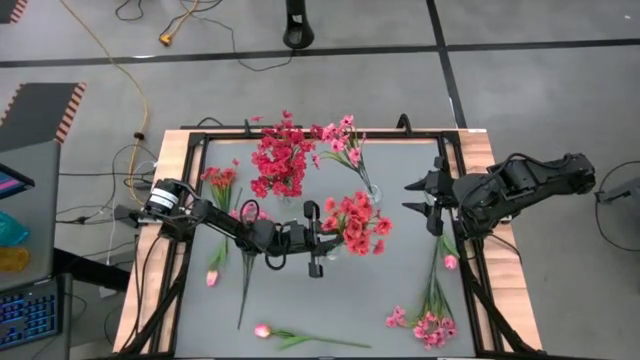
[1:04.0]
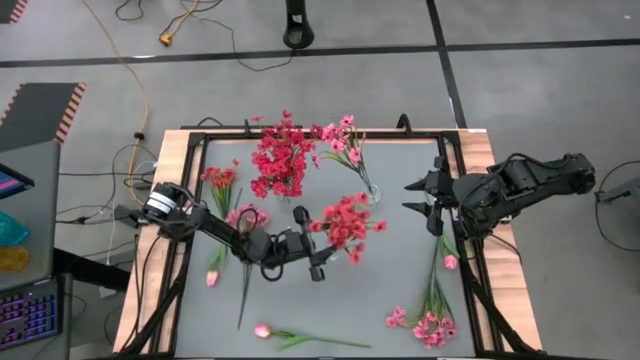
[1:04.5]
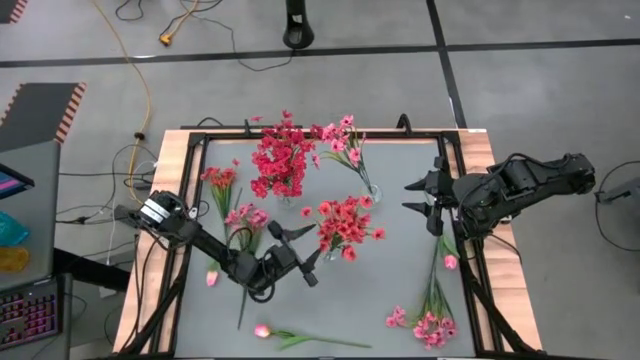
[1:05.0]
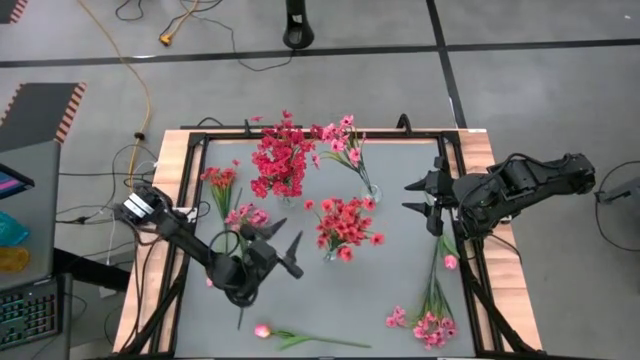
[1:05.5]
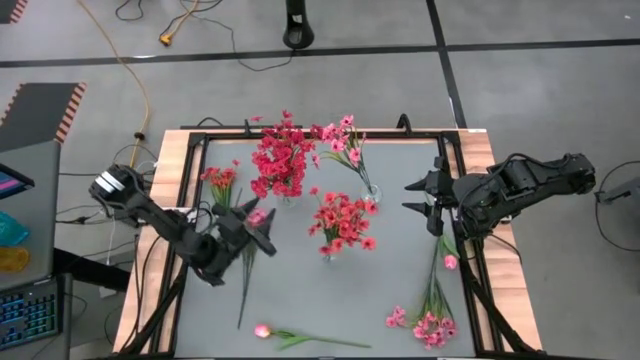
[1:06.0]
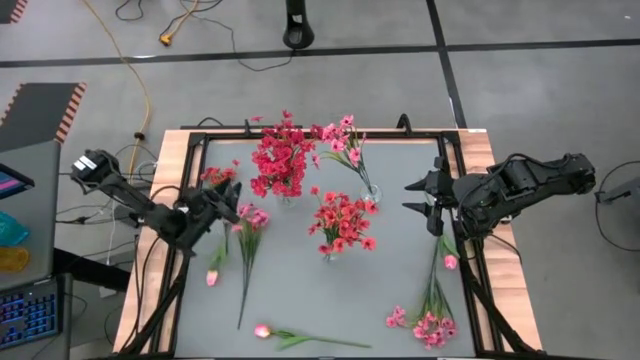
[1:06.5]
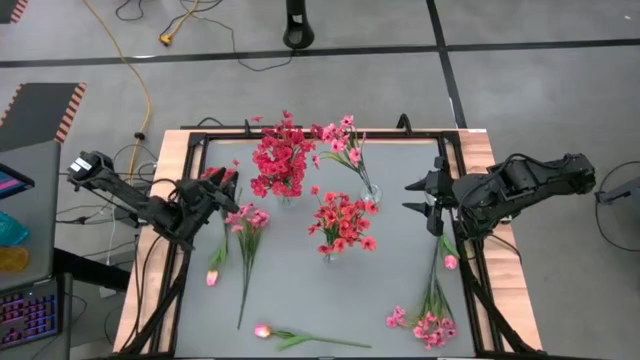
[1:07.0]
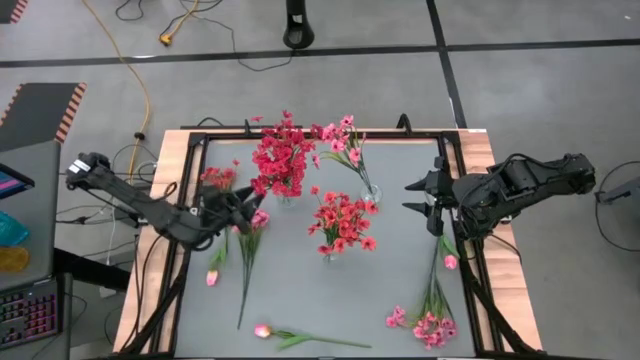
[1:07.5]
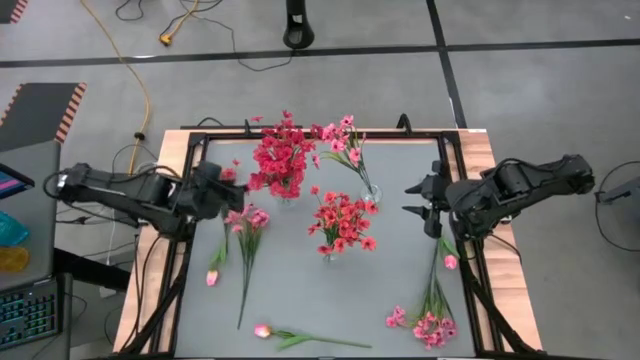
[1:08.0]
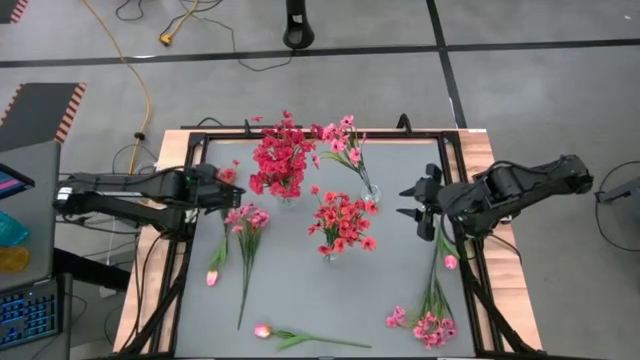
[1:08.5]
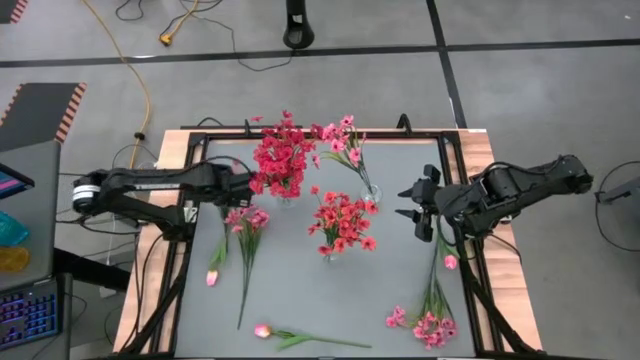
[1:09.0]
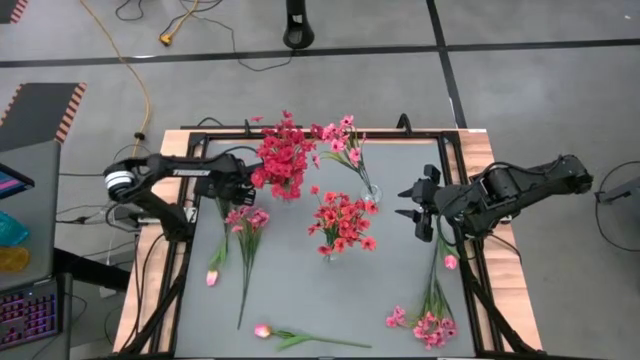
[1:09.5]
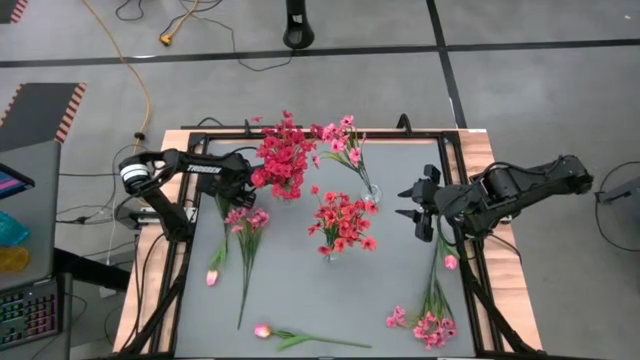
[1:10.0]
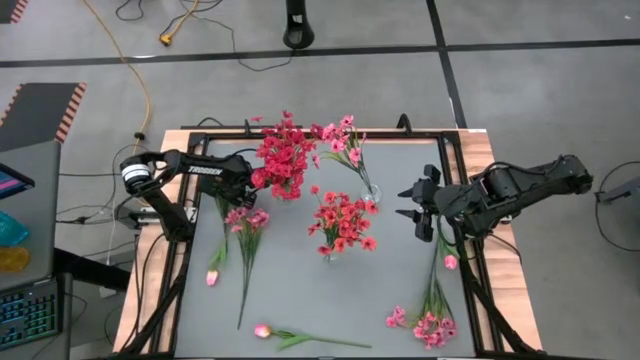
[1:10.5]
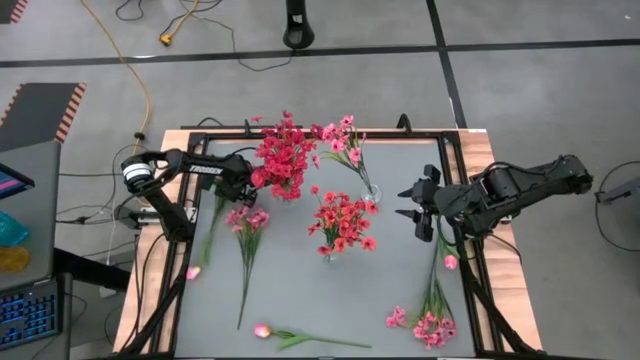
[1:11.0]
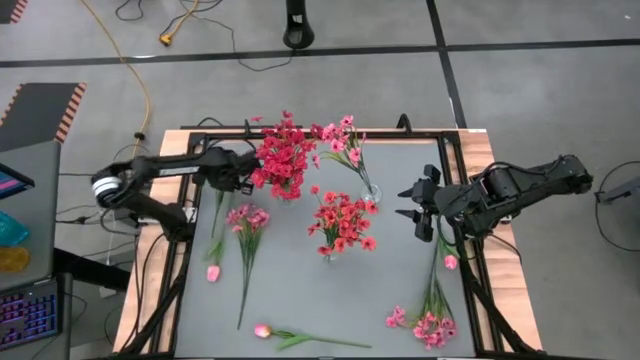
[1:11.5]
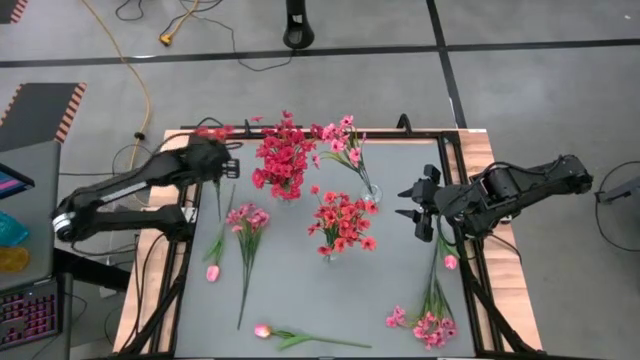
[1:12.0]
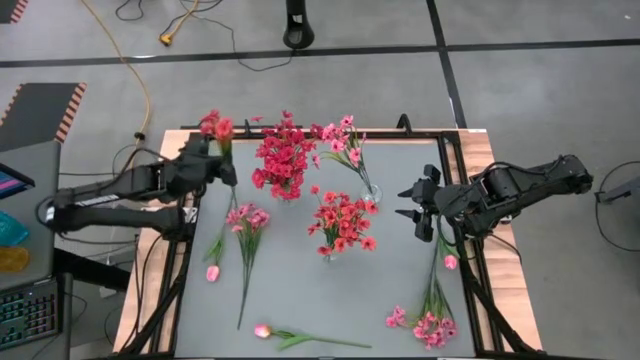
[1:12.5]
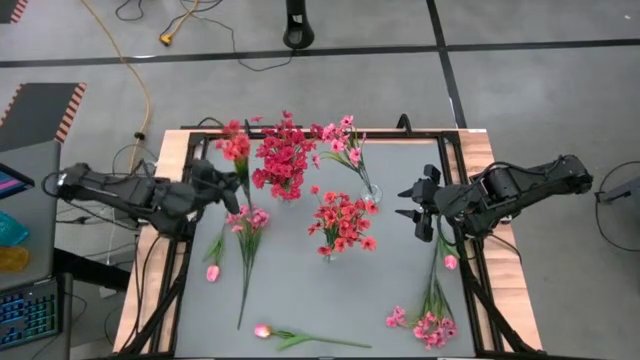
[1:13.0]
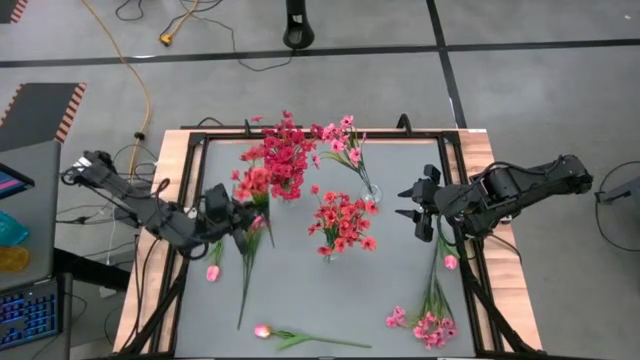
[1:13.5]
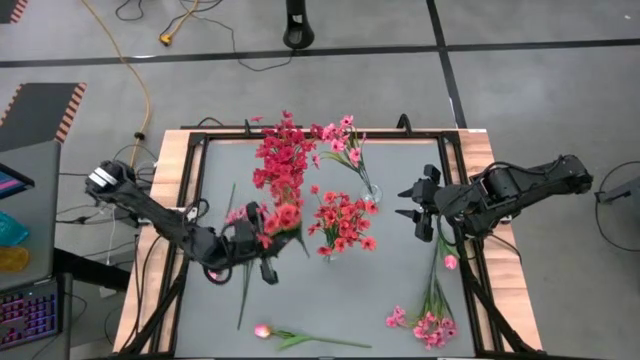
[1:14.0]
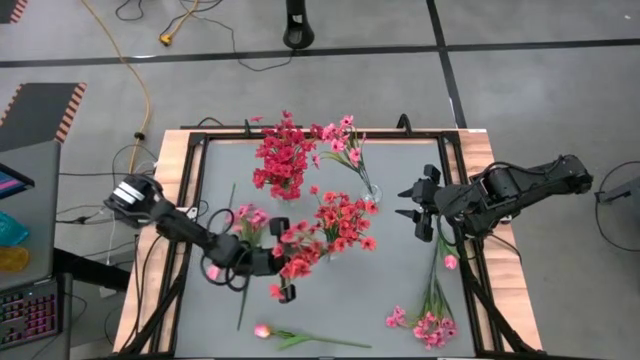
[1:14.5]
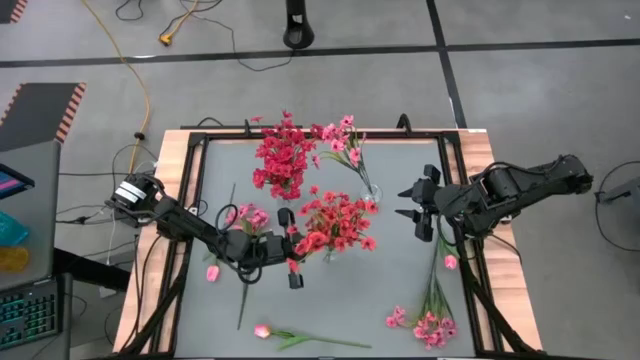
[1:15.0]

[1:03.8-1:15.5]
Task: Sort flowers into vase by color
Put the orange flowers into the bottom center transparent vase

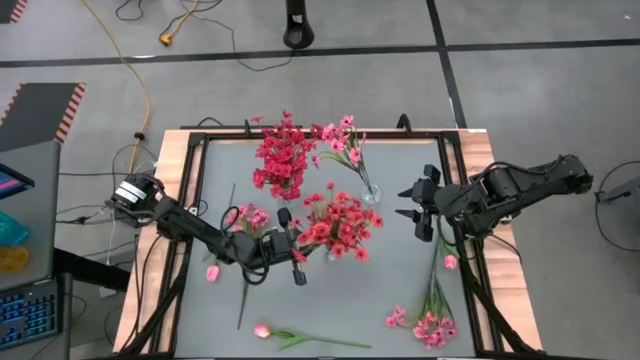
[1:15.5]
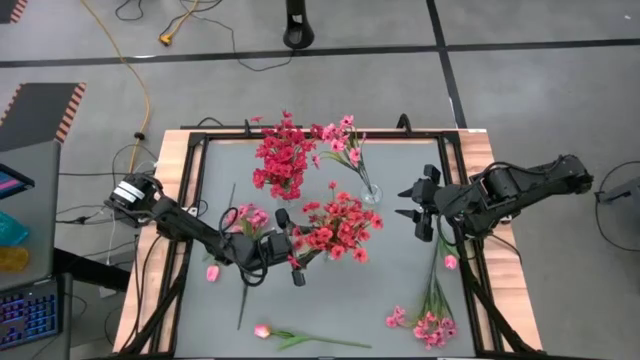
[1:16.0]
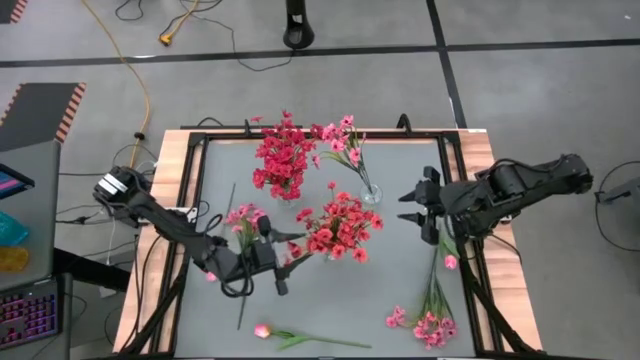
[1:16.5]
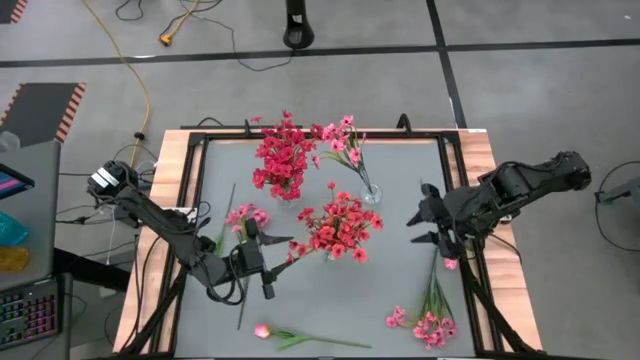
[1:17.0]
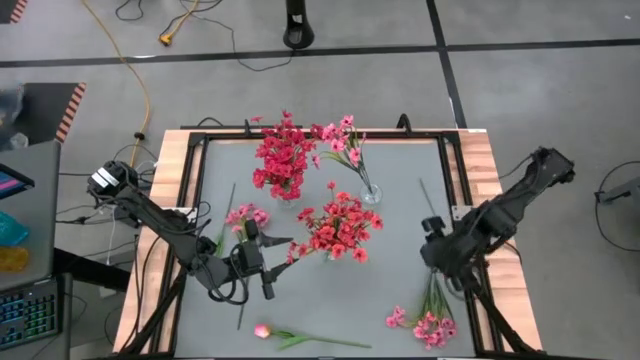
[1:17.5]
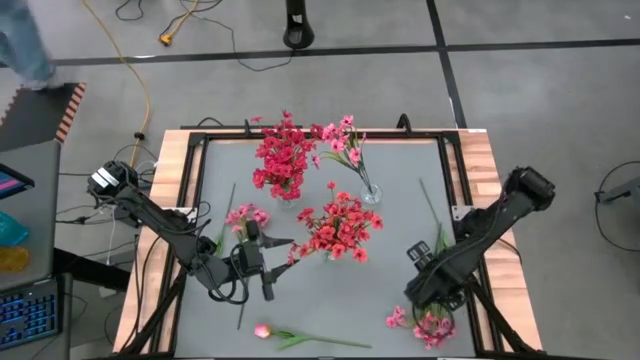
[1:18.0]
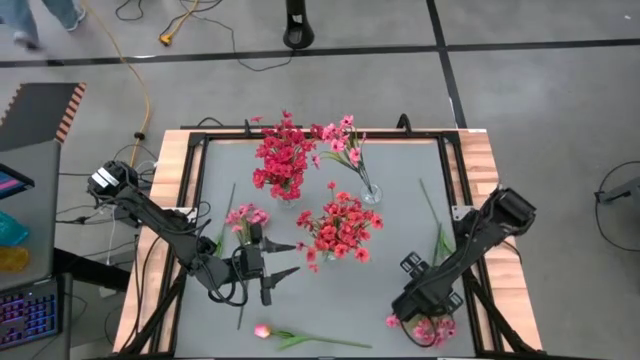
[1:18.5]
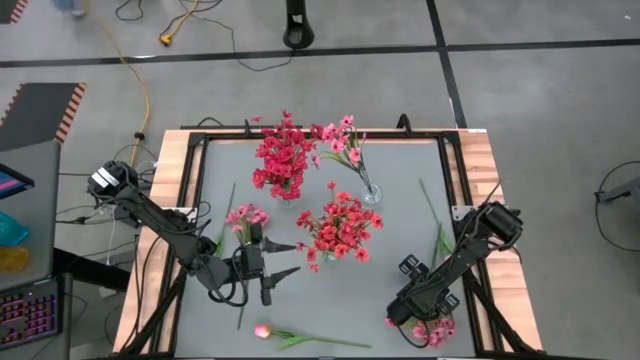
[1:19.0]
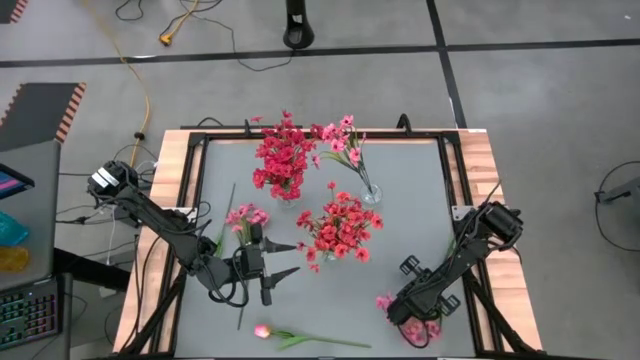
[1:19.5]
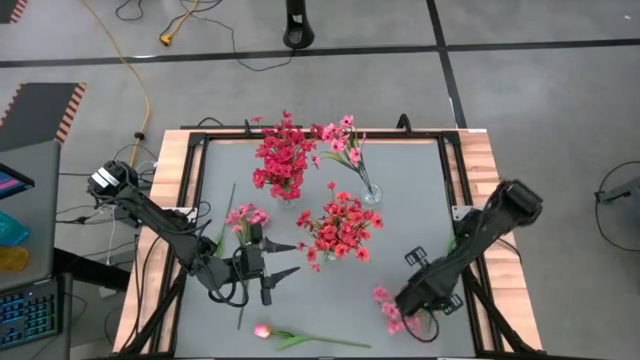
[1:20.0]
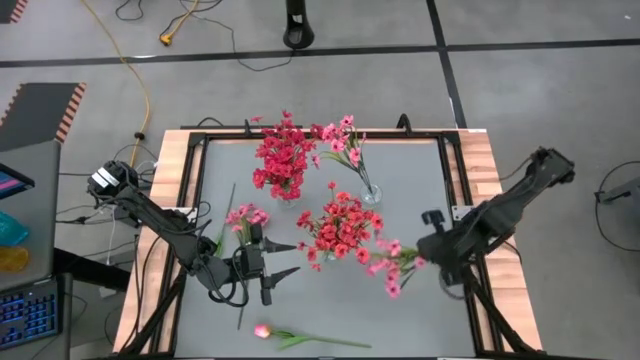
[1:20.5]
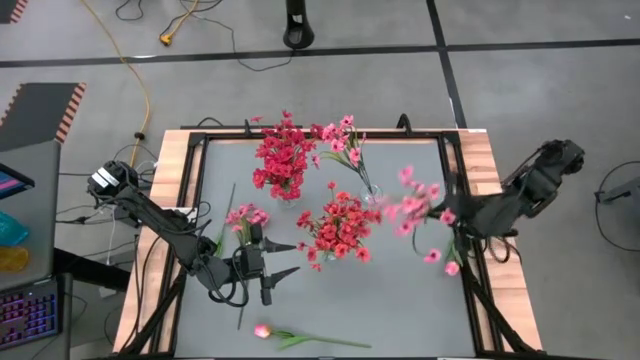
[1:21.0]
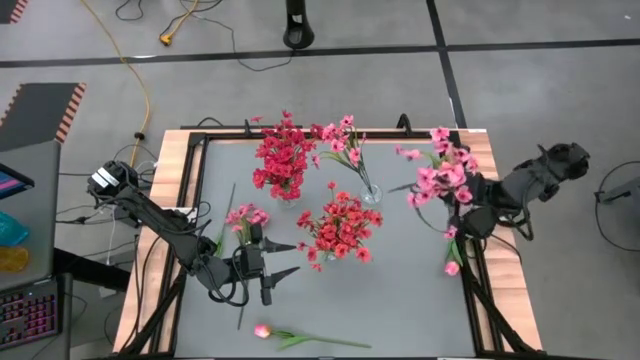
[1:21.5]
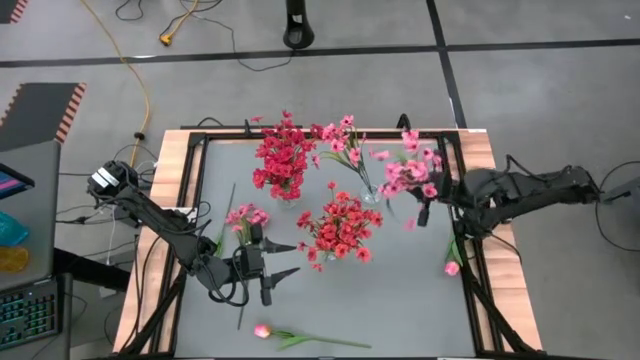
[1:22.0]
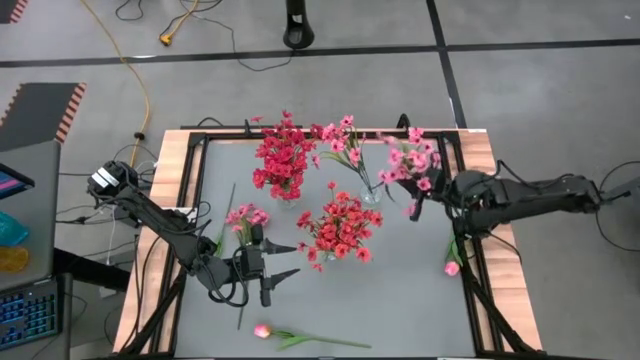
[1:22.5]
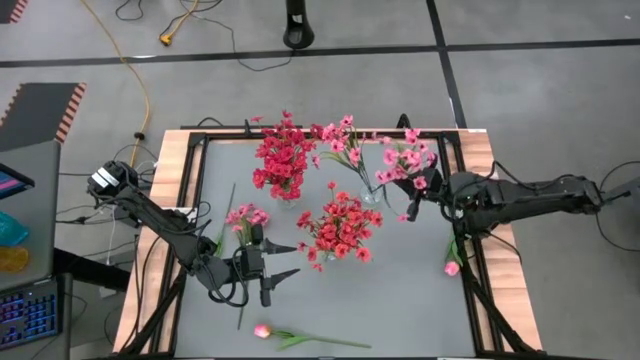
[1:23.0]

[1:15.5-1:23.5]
Put the bottom right pink flowers into the top right transparent vase

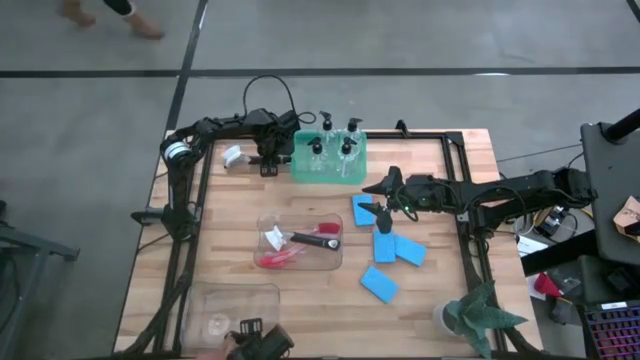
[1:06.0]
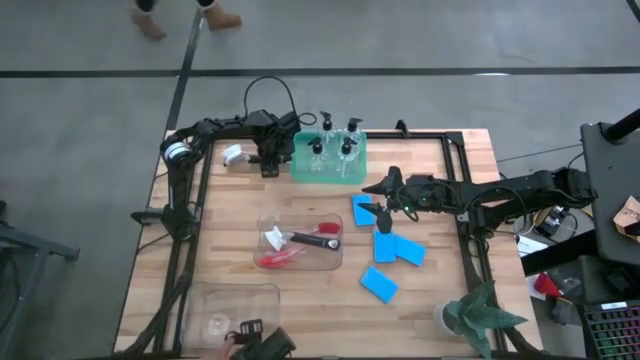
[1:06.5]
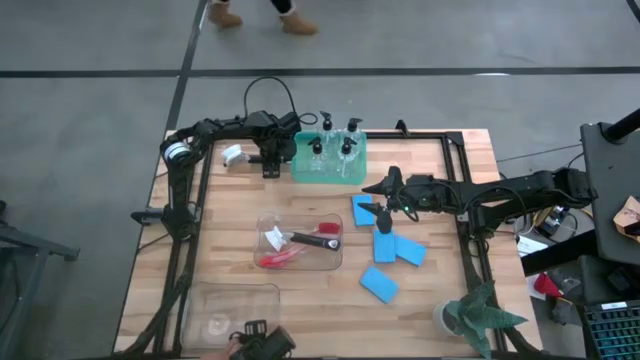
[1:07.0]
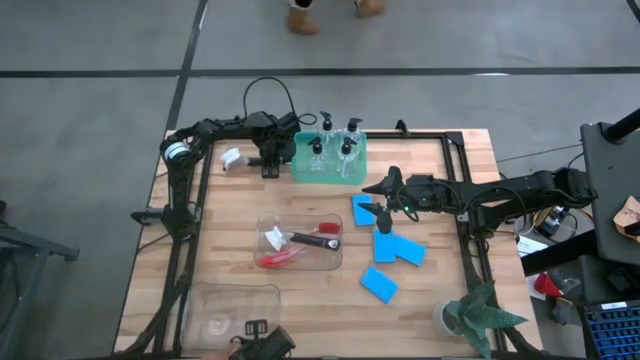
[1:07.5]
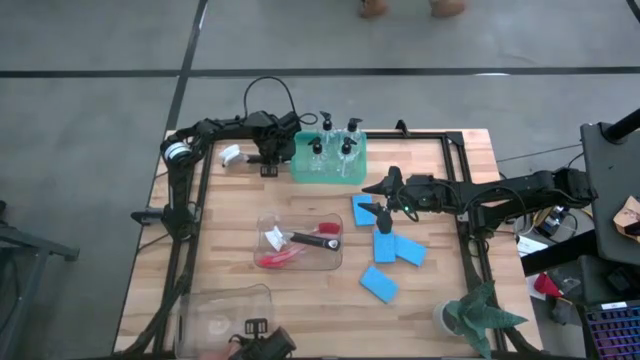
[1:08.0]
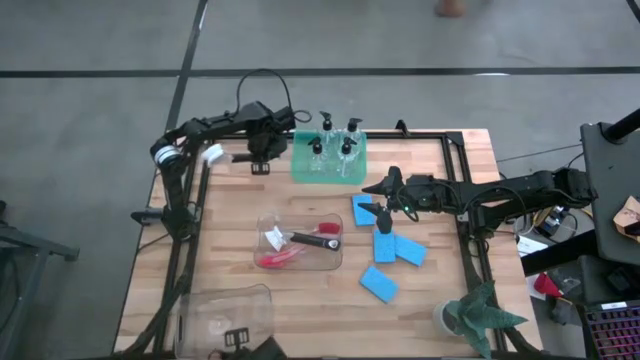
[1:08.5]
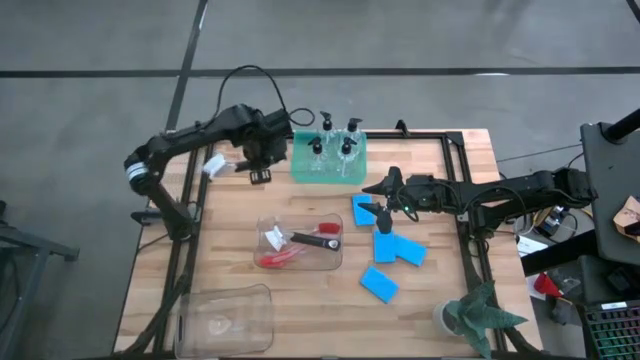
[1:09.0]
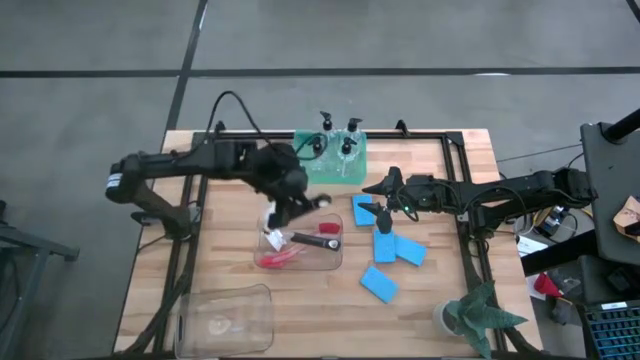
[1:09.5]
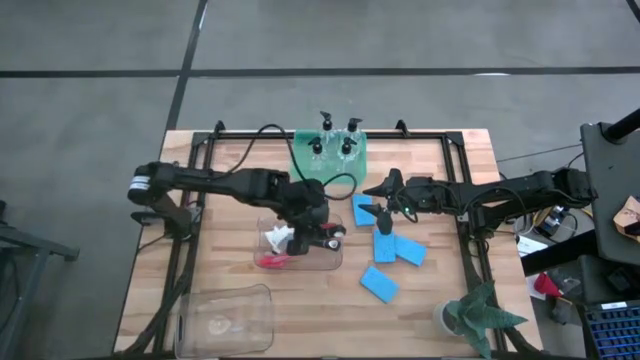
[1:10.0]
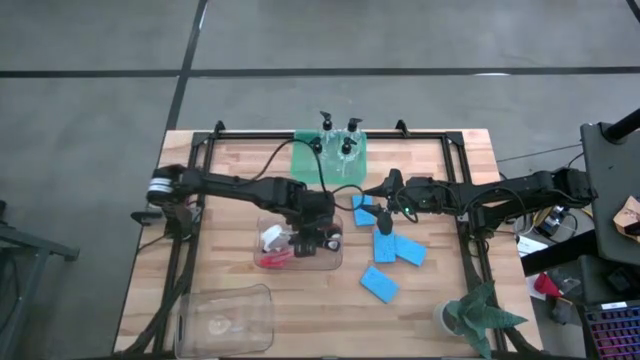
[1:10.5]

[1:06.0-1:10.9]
Task: Pick & Place Kitchen Sink Supplies
Put the black dish brush into the top transparent bin
